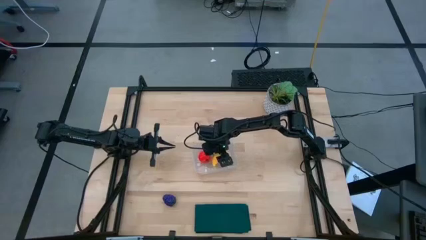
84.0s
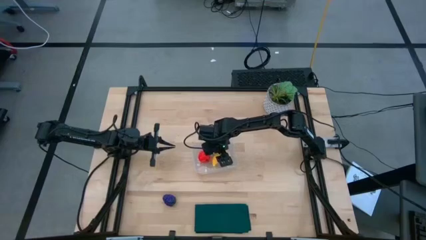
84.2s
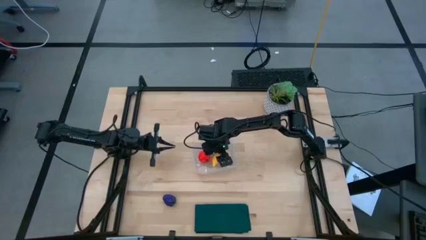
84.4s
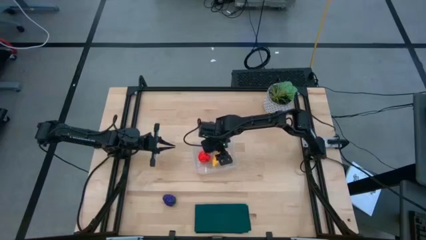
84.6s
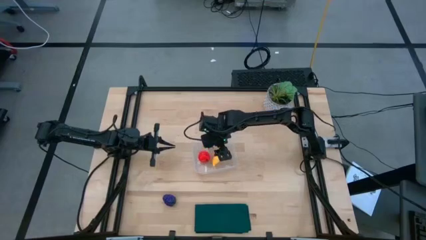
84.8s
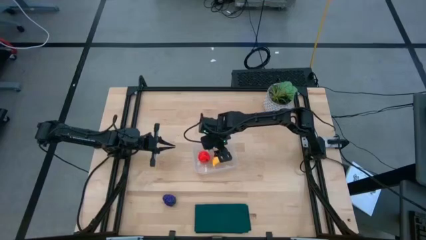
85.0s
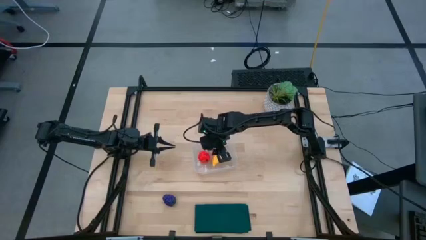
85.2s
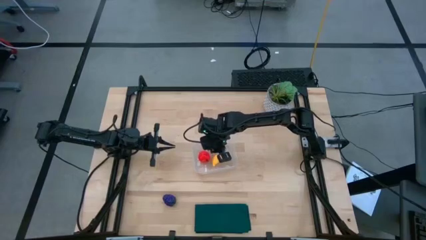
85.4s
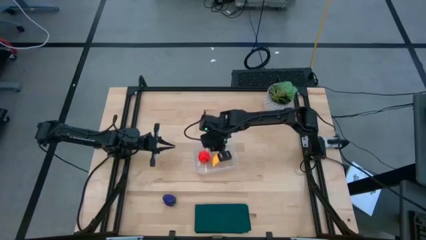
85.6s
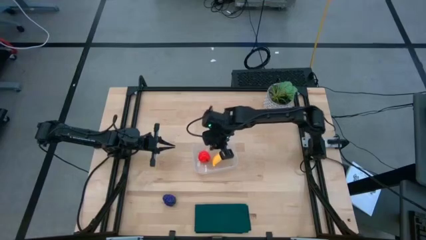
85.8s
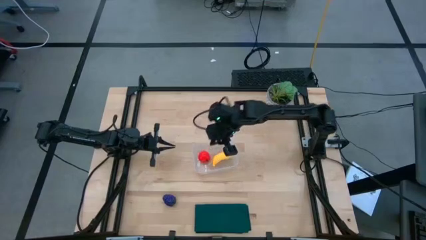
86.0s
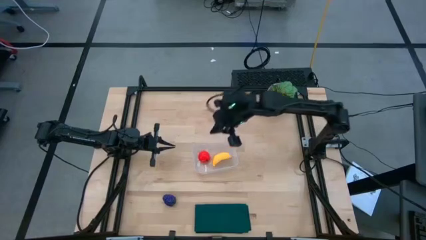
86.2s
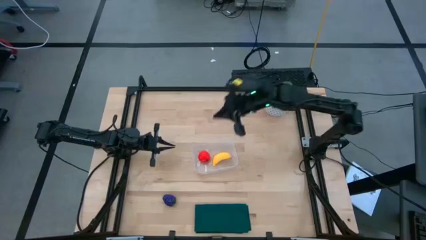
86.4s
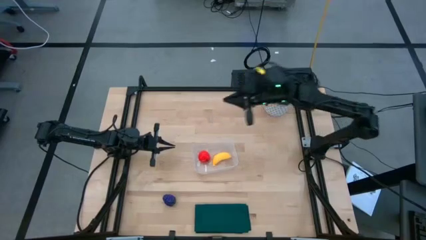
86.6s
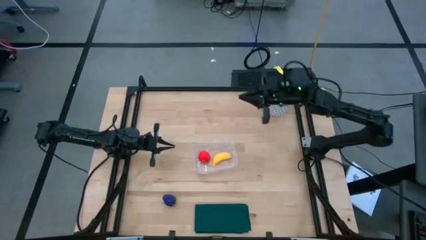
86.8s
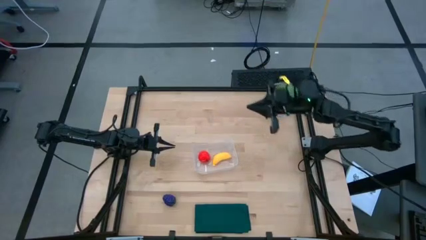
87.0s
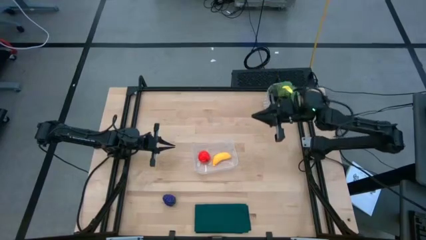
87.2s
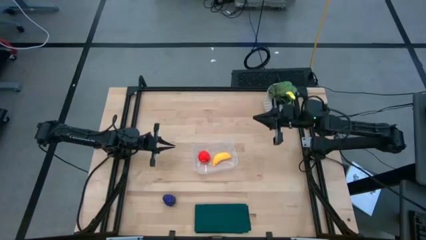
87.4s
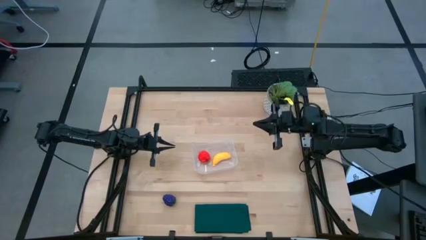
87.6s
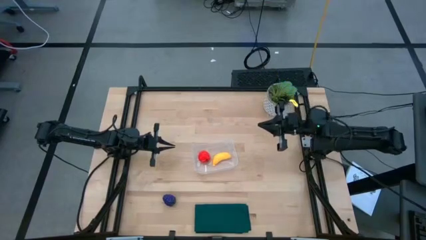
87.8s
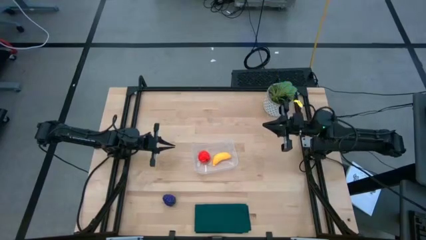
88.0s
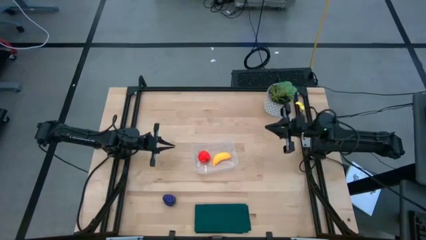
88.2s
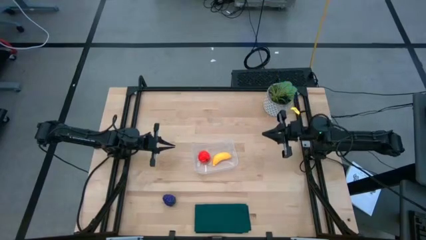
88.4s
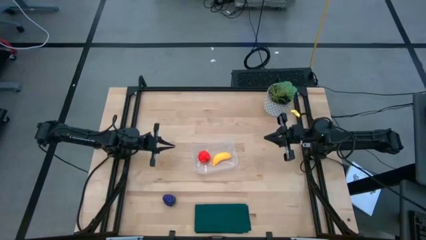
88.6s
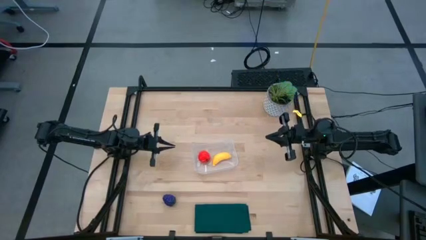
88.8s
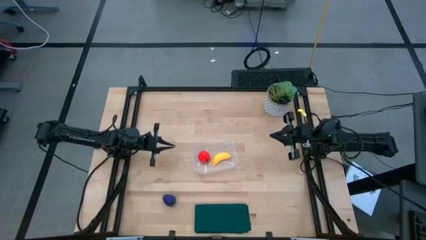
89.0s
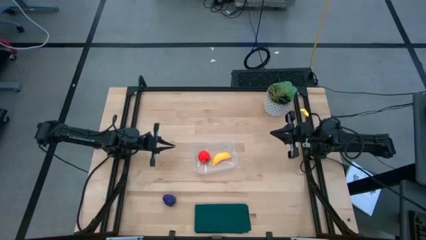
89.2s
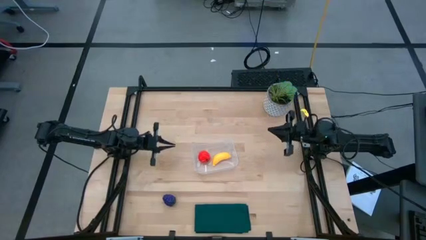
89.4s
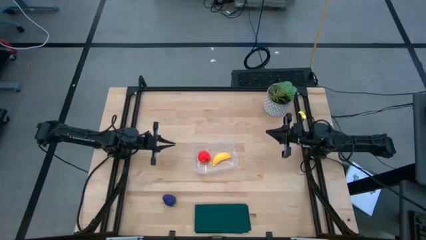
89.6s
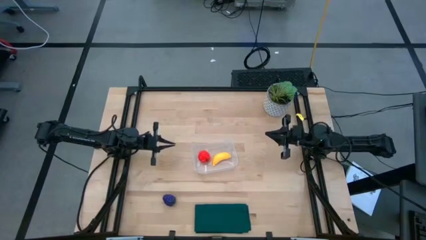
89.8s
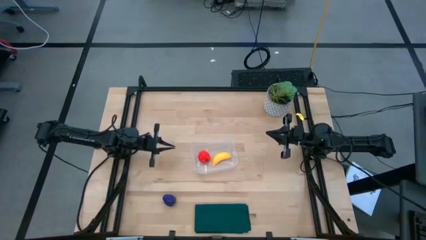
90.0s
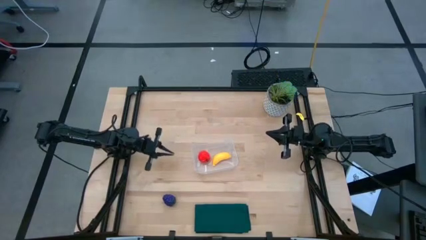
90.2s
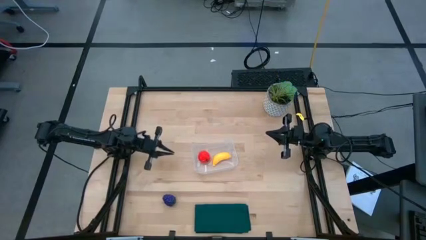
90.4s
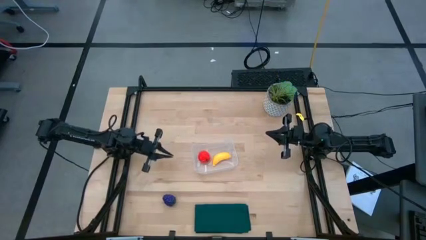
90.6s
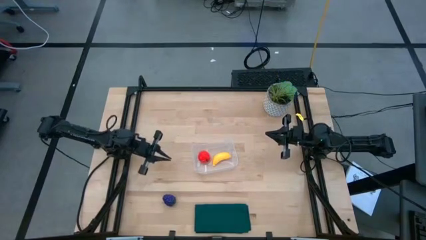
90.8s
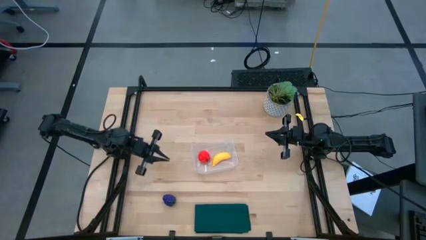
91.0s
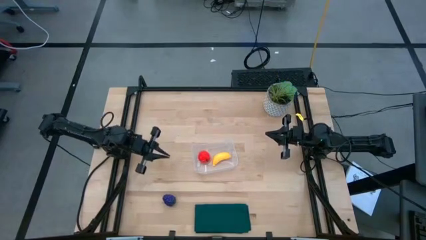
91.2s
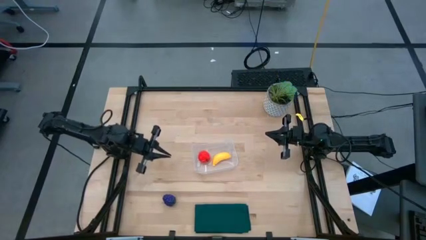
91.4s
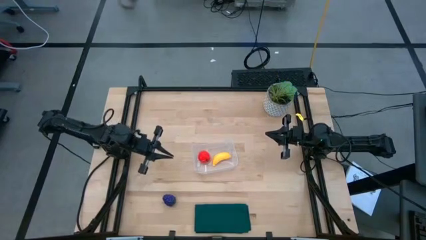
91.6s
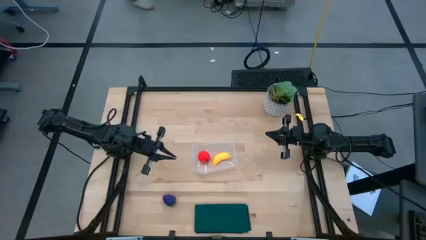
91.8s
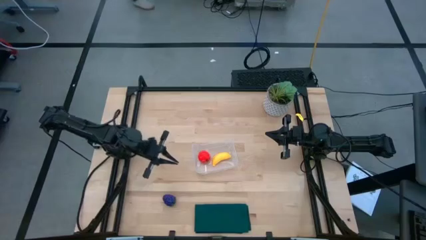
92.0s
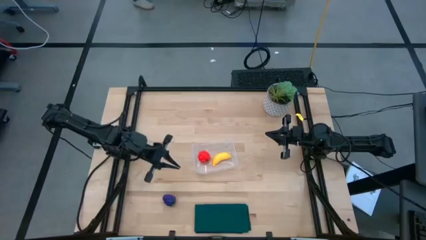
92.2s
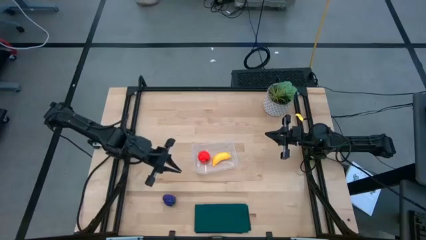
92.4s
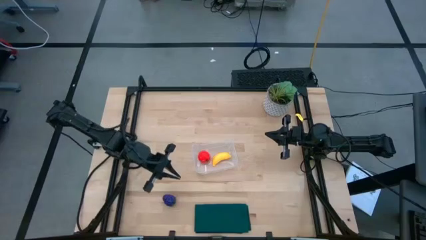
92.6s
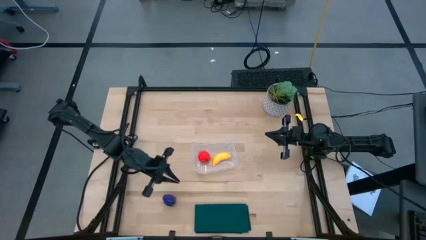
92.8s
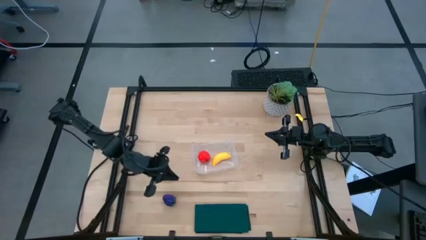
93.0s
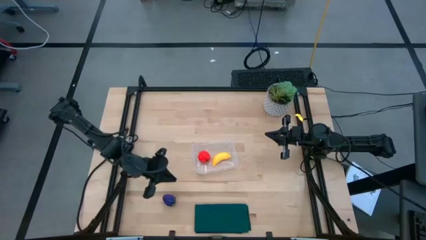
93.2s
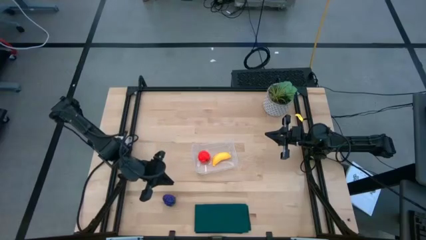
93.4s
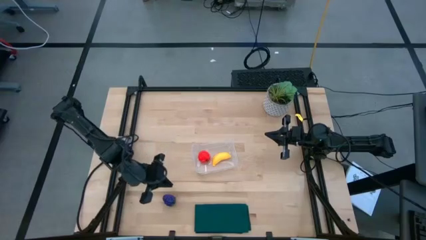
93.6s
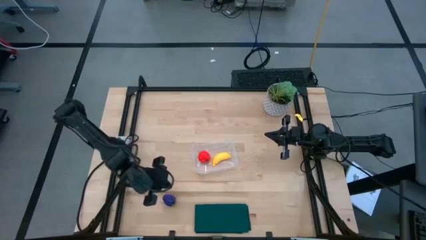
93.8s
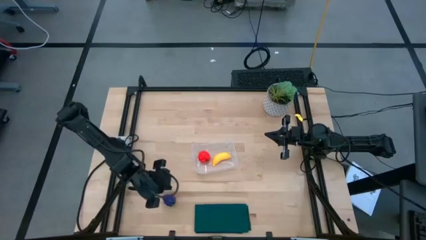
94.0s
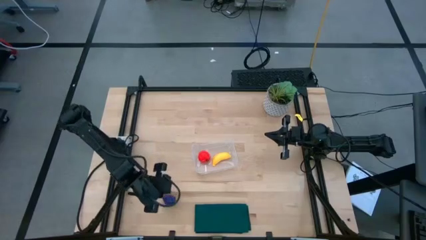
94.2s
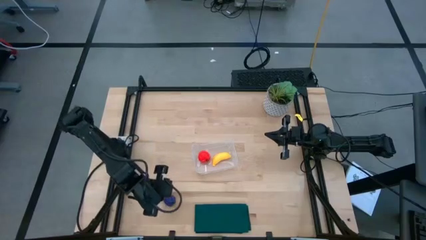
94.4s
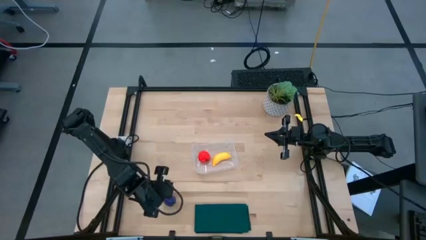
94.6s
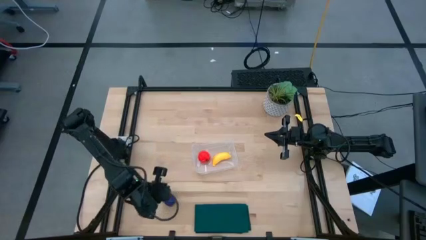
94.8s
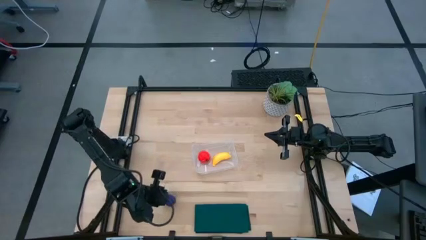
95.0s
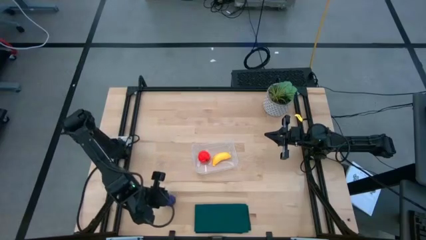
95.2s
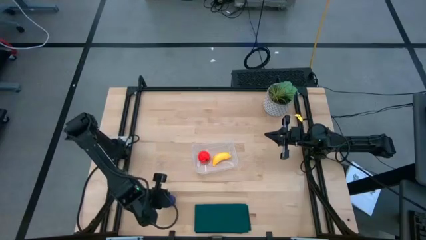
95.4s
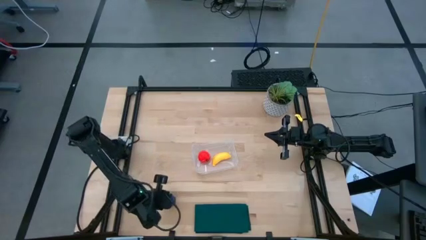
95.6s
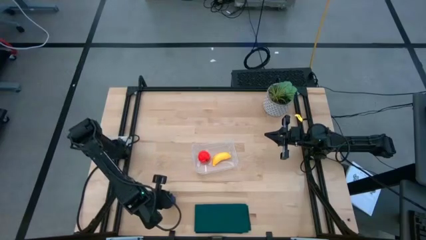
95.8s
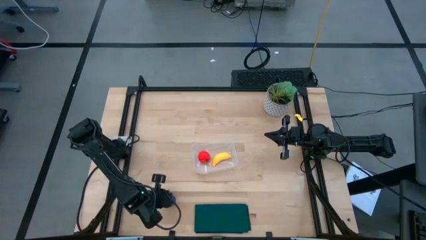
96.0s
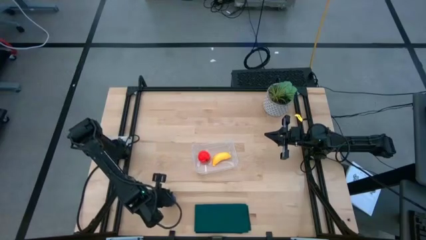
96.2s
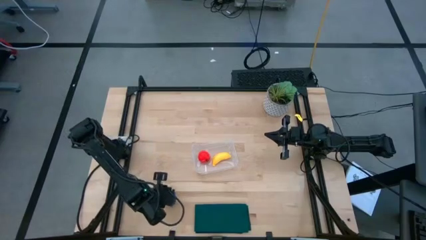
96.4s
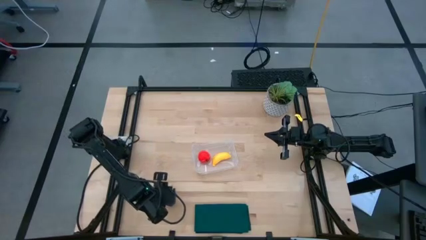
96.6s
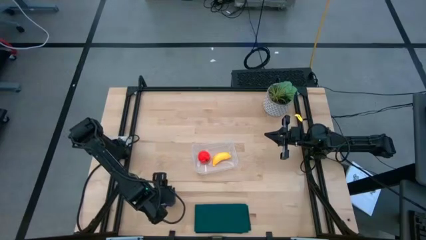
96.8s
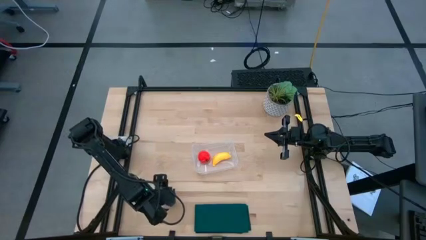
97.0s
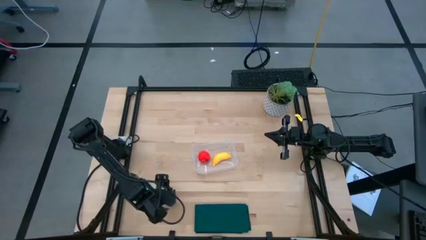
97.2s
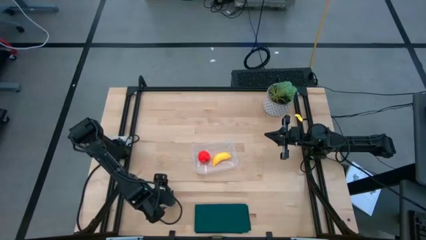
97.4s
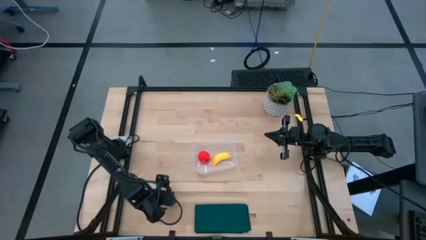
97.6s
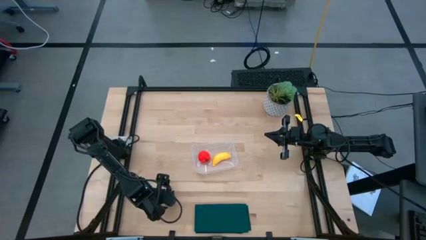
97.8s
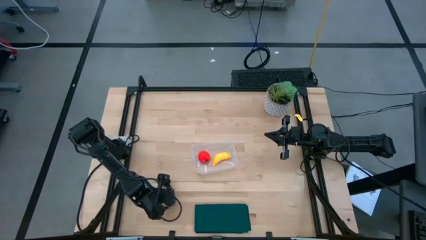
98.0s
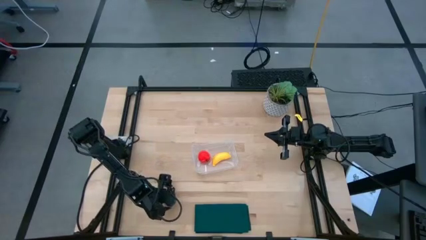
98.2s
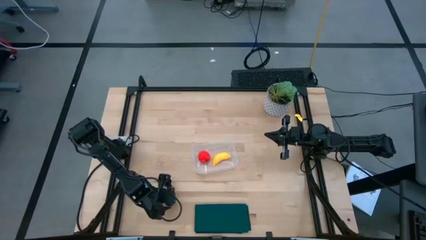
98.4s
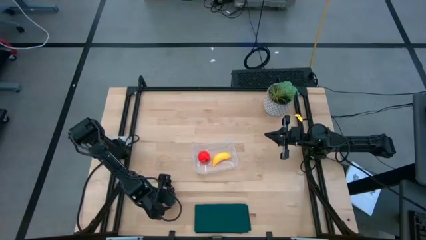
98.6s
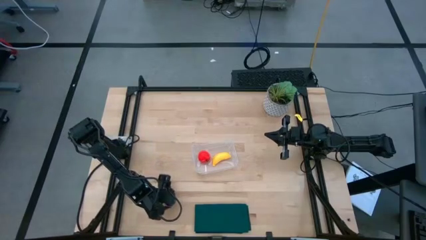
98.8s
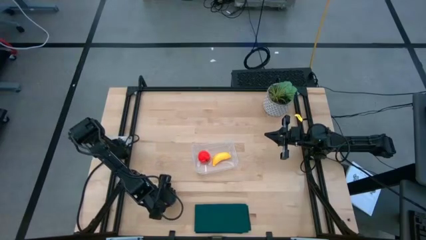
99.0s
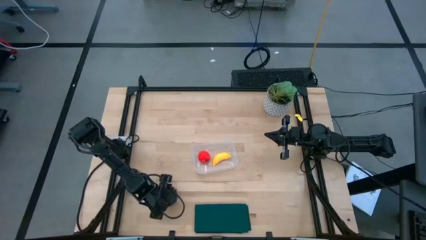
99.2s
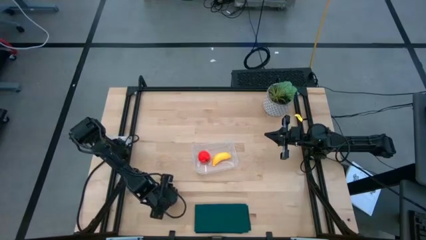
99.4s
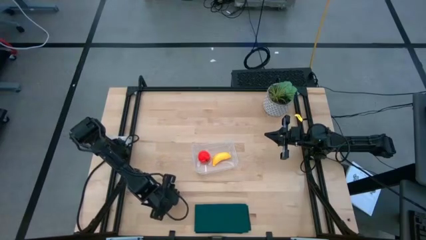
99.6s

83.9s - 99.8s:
Task: Pick and placing Produce into tupperware
Put the purple grapes into the transparent bin

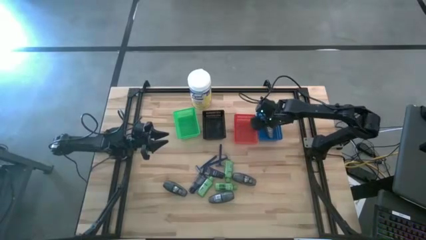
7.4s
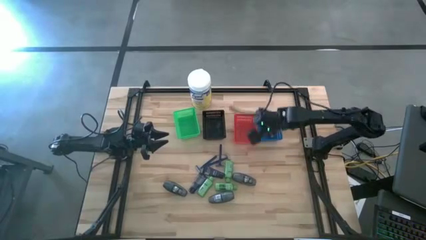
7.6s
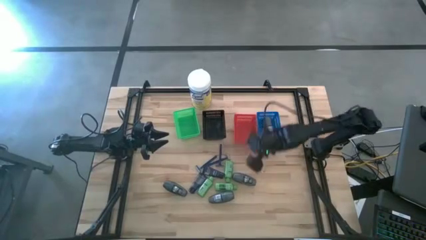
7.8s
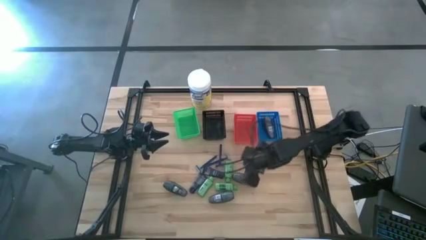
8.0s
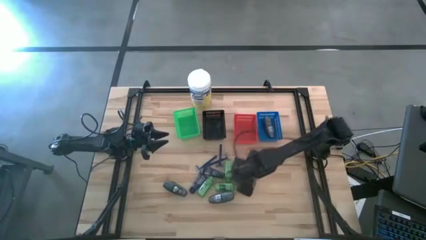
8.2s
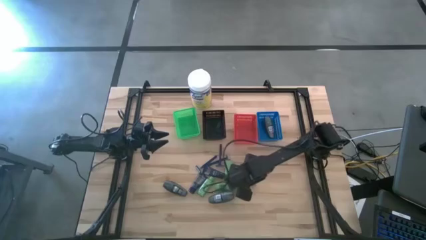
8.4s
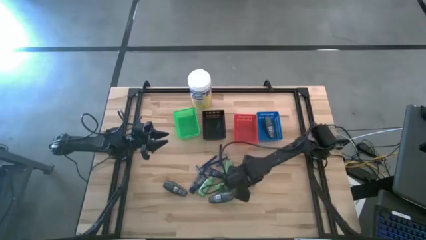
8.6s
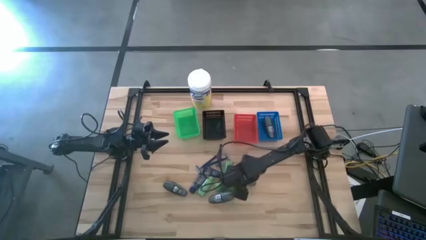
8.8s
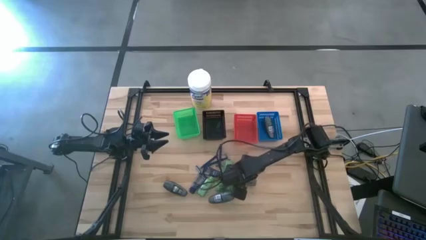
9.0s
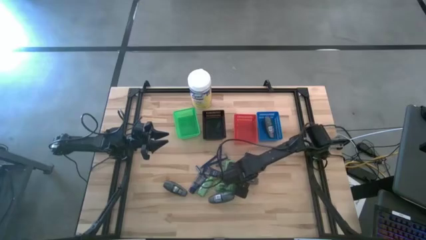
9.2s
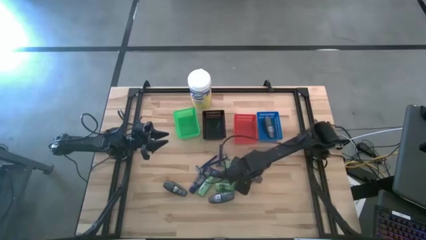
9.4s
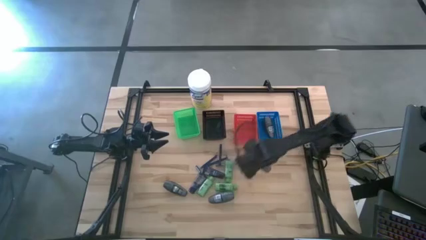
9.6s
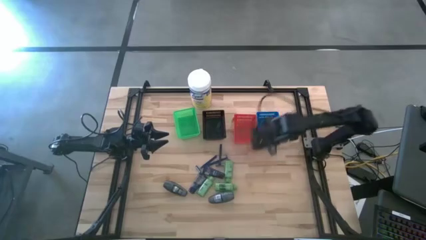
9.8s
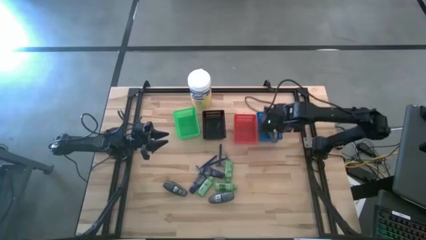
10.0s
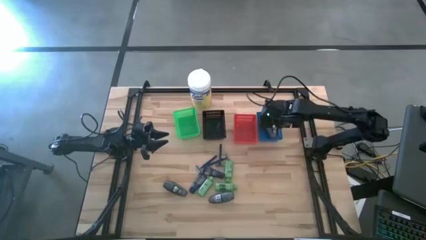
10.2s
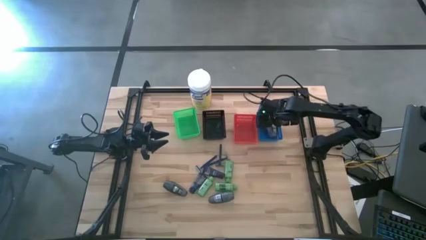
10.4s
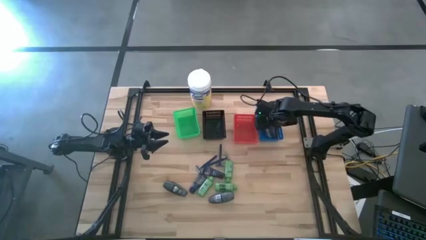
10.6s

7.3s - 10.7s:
Task: Pick & Place Travel size toiletries
Put the black deodorant into the blue bin
